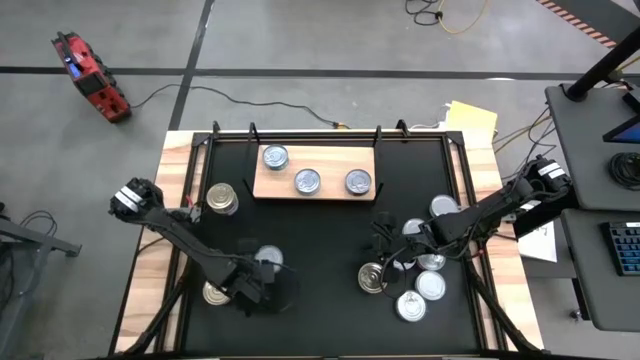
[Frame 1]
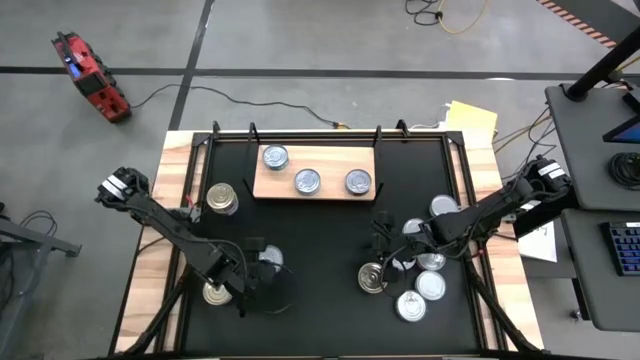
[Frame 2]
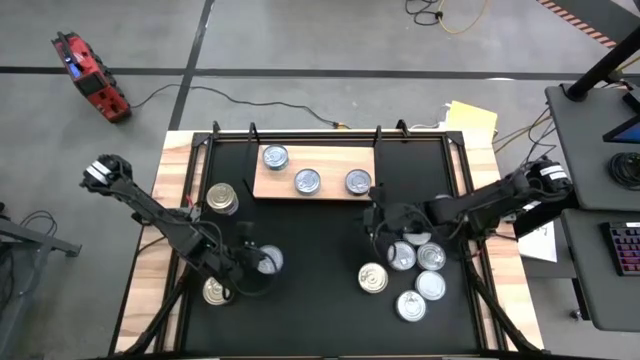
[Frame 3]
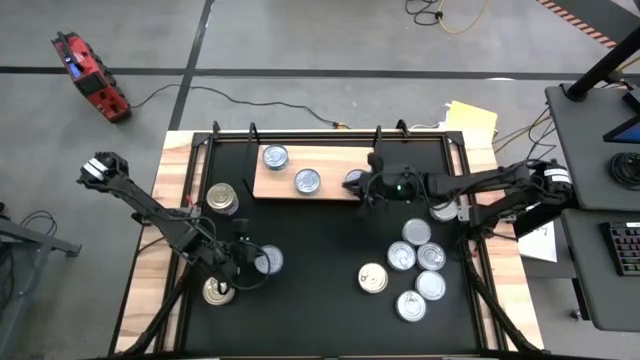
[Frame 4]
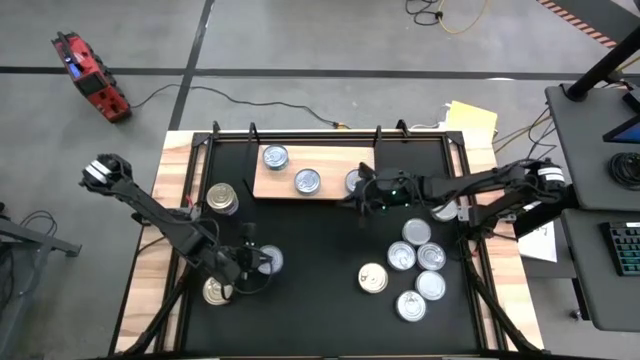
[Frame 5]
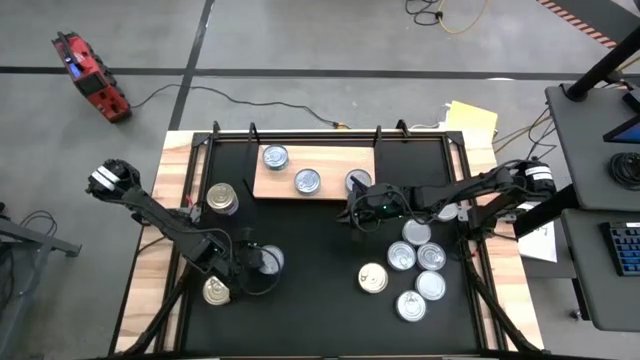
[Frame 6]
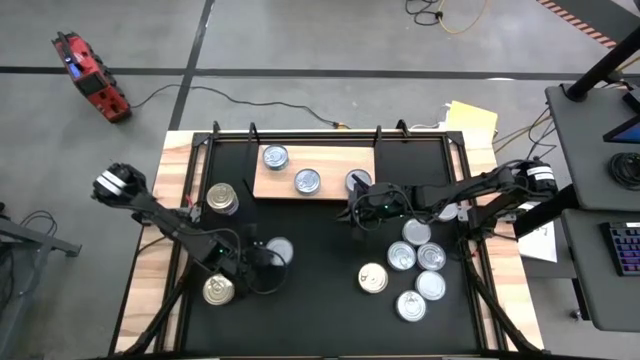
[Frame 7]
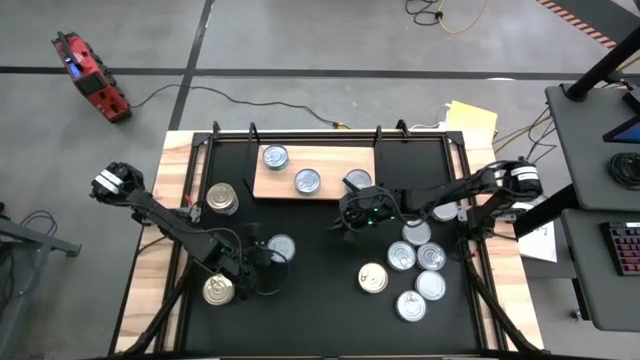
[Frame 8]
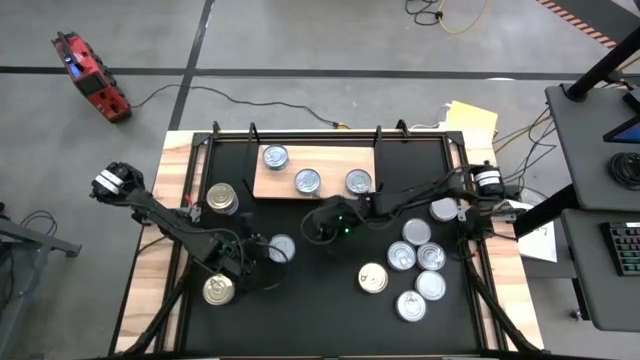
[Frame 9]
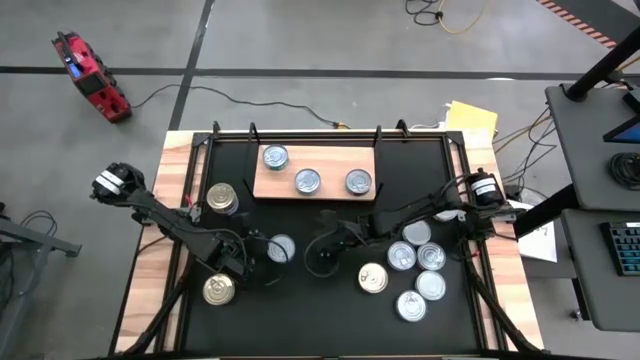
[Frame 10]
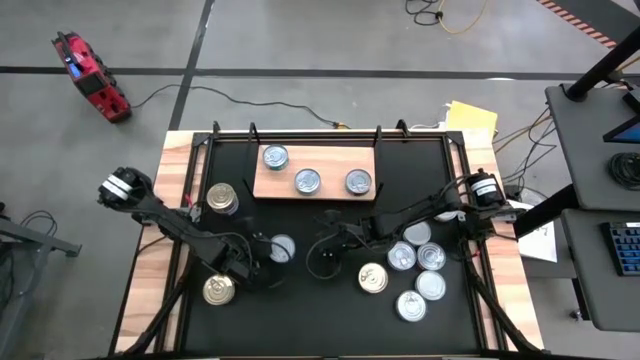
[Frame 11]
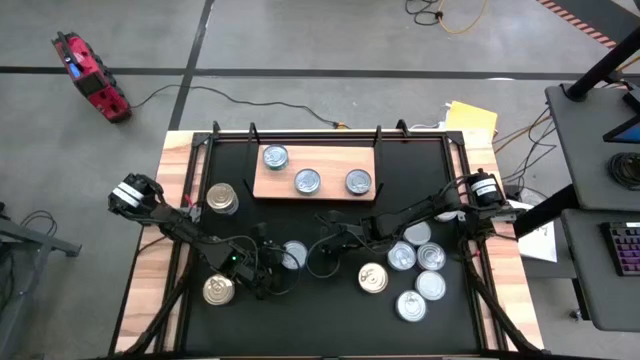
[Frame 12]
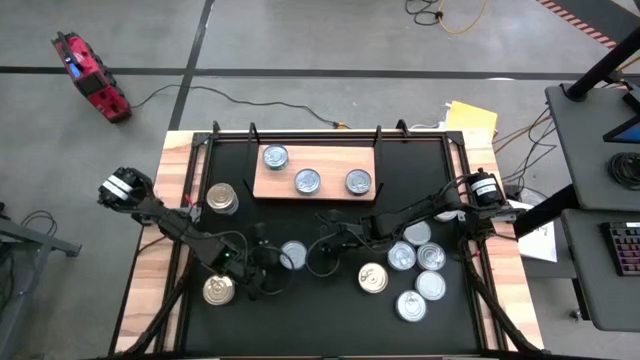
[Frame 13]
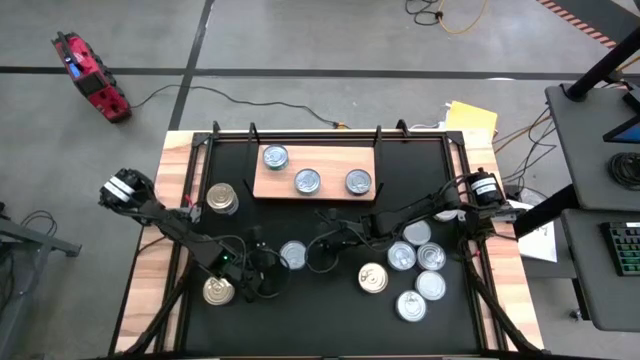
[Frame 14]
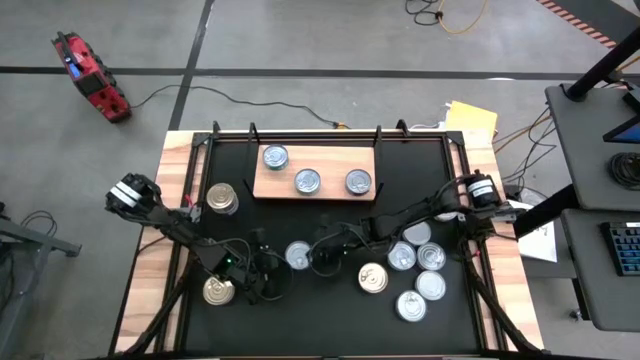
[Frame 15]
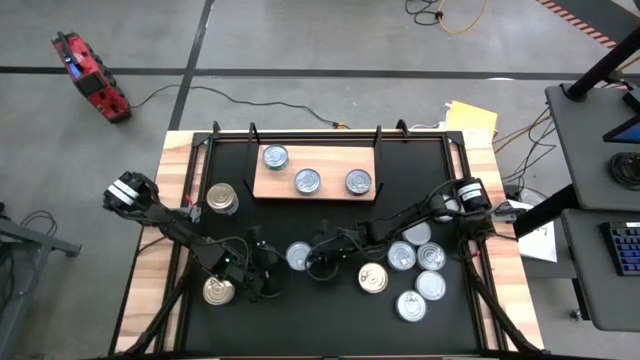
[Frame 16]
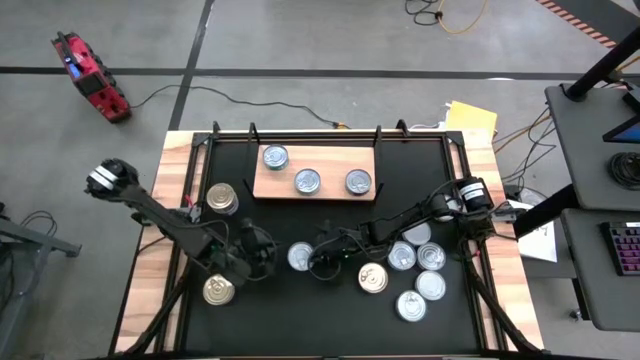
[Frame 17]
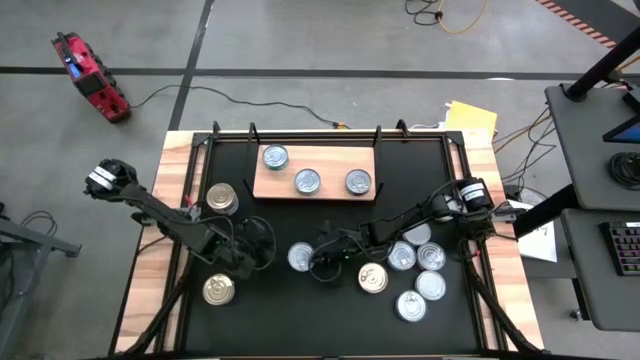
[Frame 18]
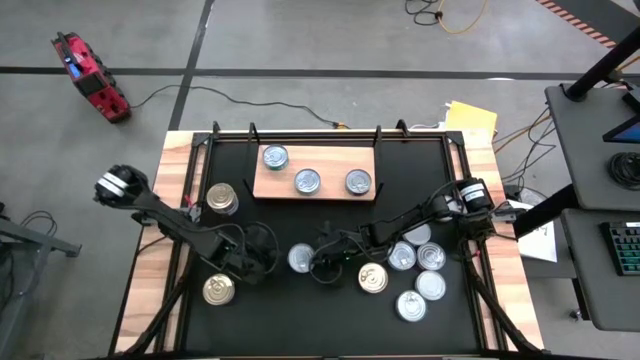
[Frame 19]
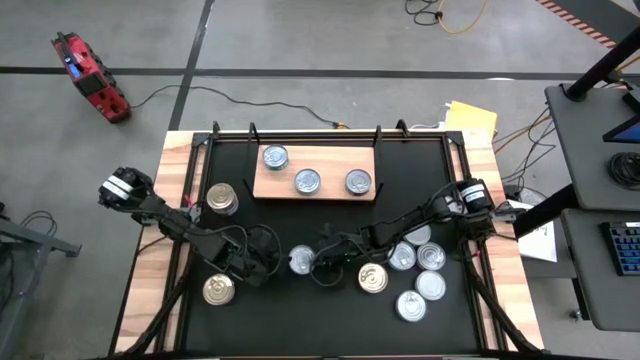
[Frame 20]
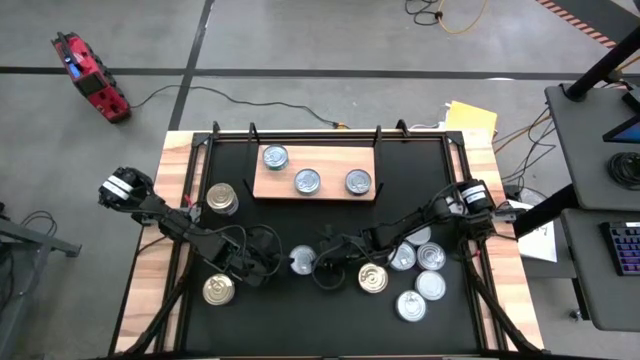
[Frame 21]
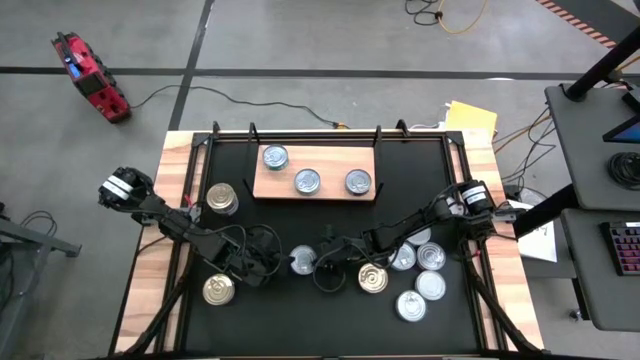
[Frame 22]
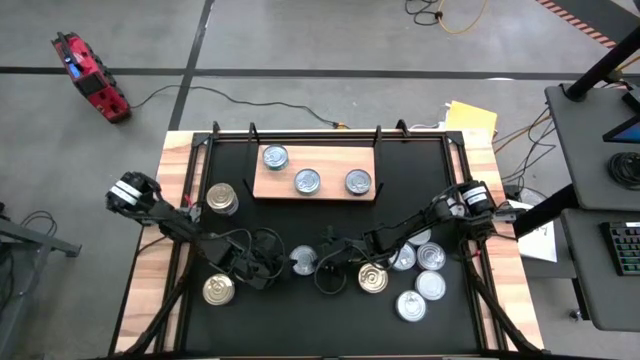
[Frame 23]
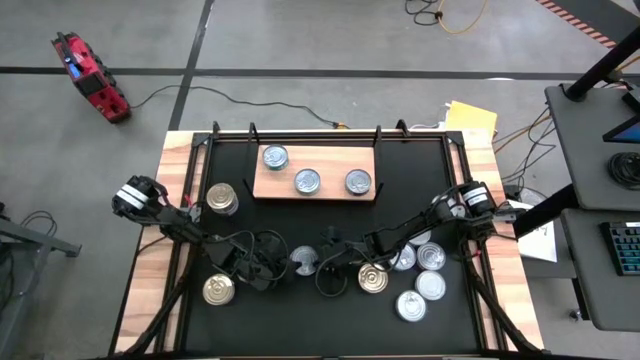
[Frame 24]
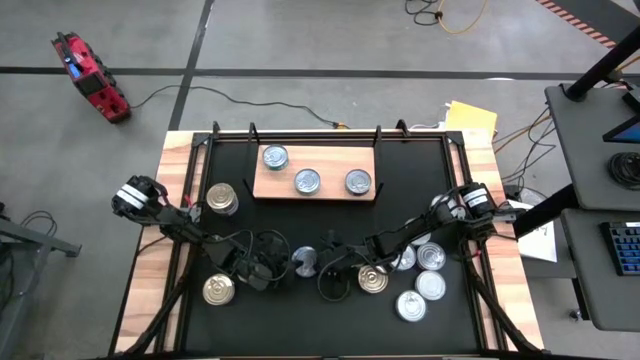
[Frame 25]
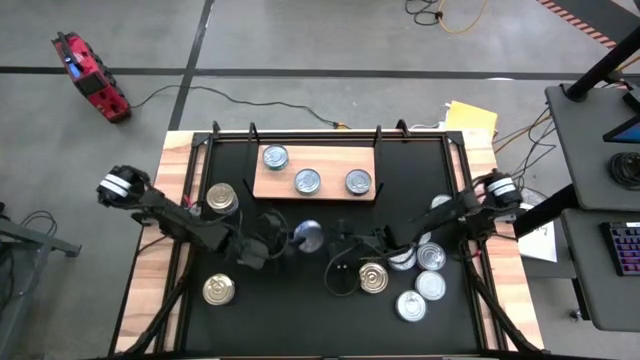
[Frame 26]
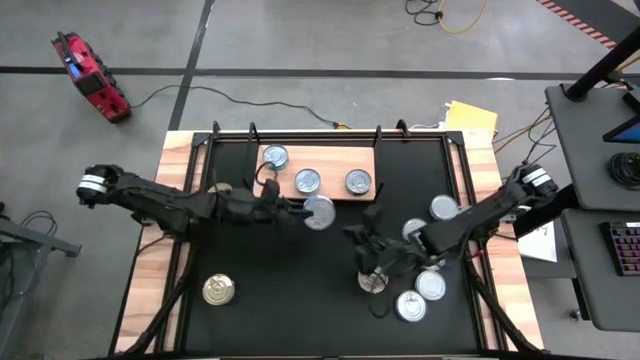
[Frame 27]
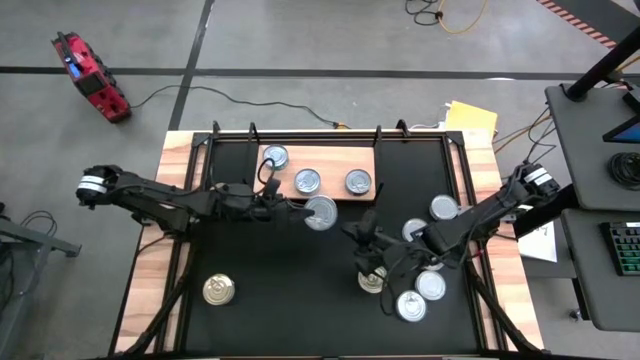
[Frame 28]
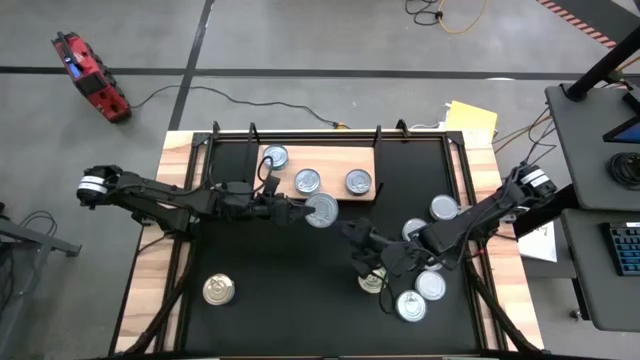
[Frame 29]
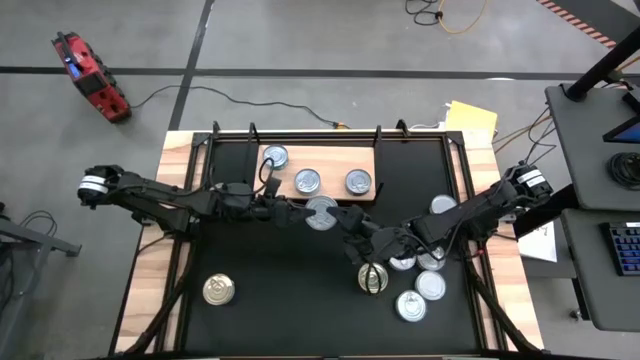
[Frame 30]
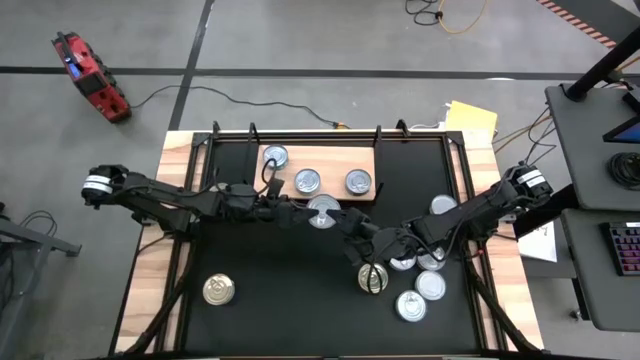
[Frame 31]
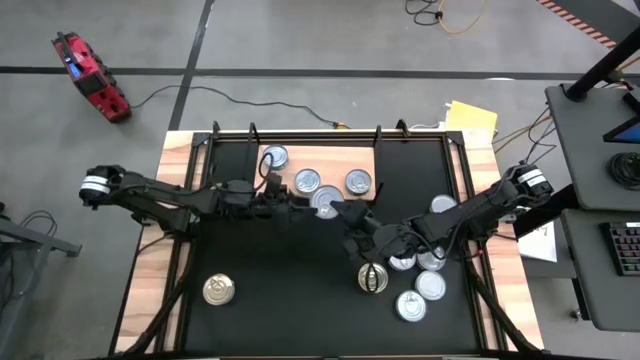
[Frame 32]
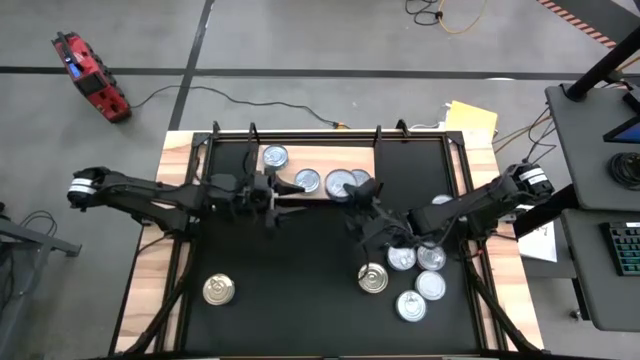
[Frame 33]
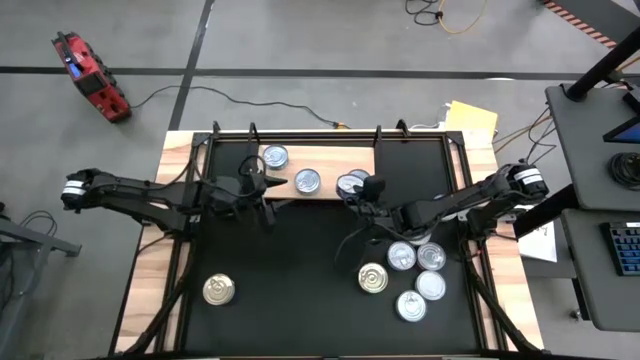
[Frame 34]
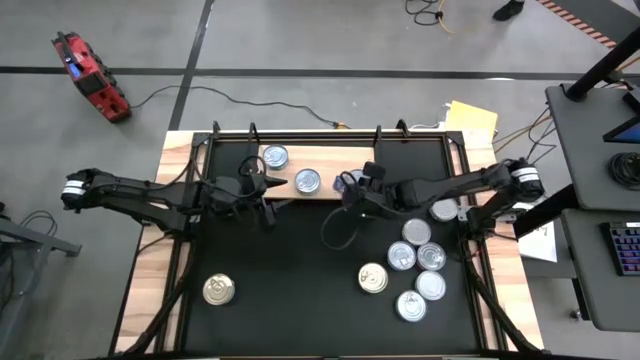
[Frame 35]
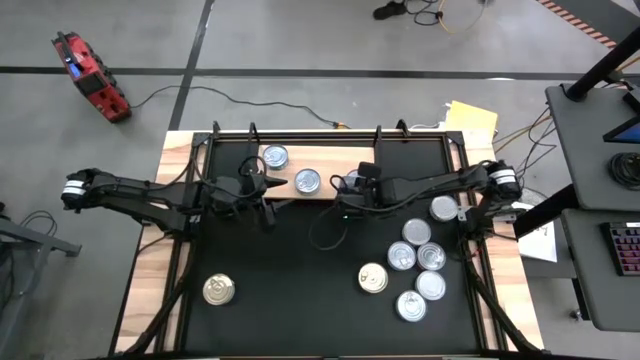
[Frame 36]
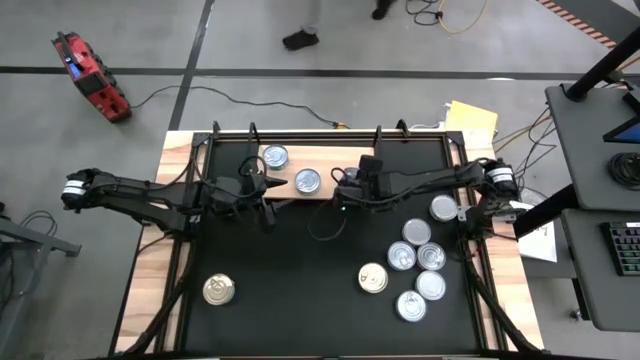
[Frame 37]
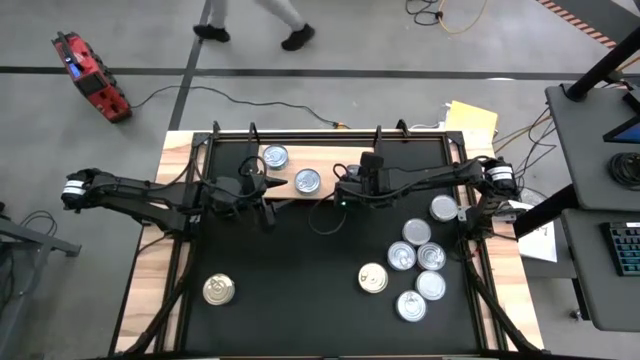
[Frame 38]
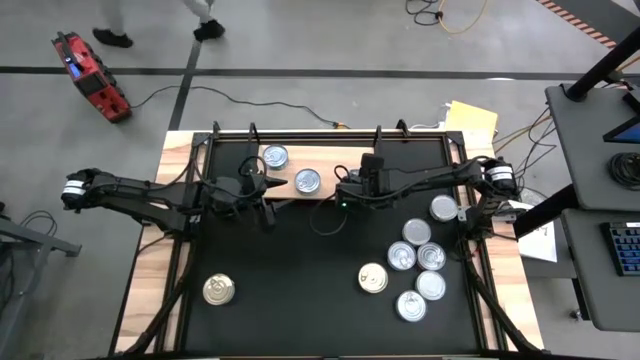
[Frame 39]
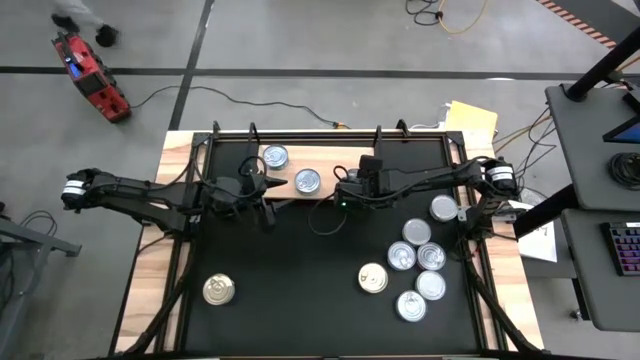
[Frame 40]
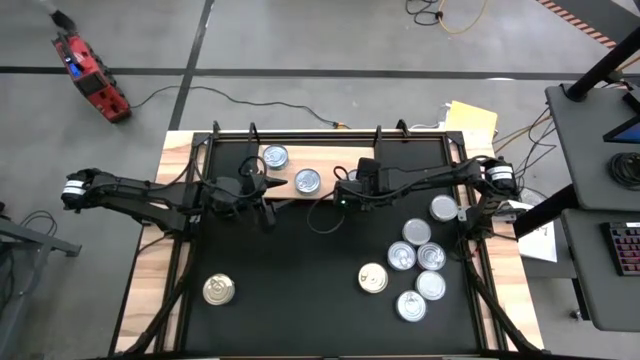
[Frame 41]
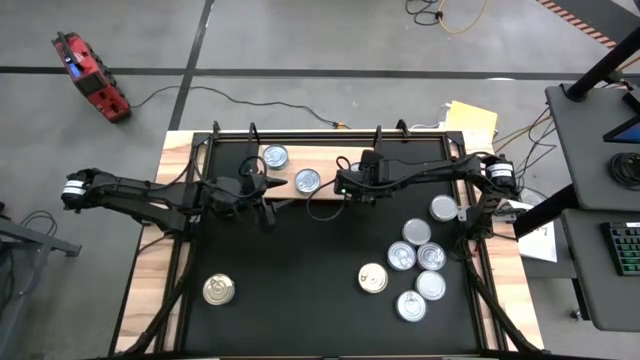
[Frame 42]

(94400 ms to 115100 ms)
Task: Stack canned seafood by type on shelf
Stack the blue tuna can on top of the other blue tuna can on the shelf
